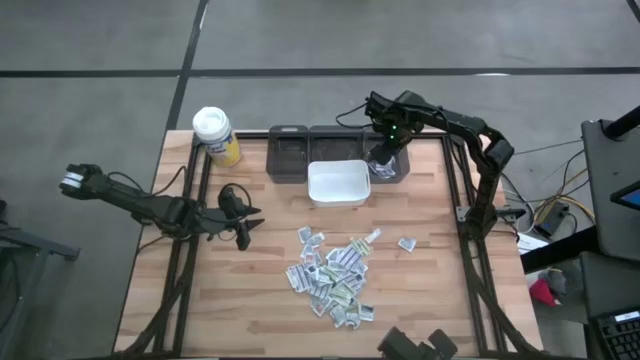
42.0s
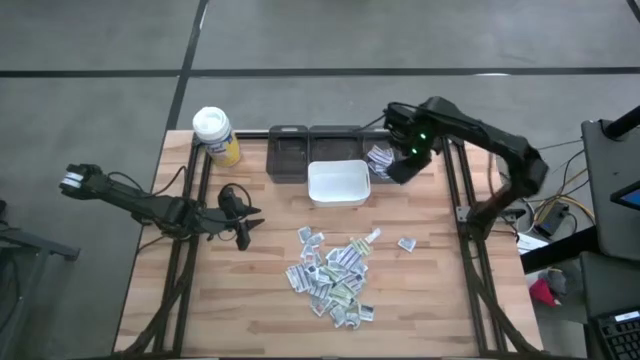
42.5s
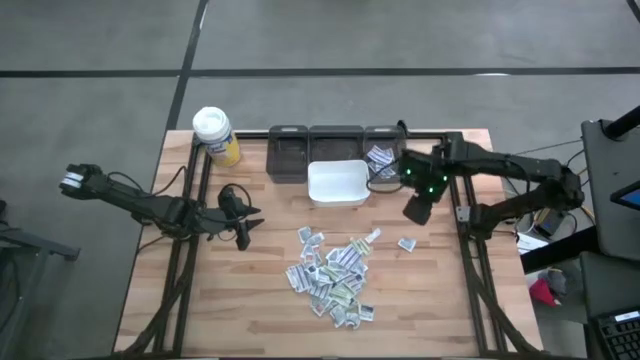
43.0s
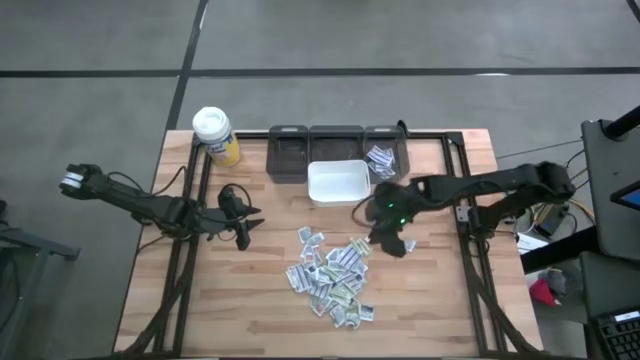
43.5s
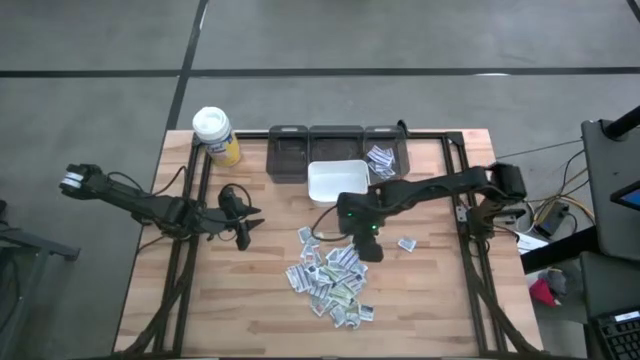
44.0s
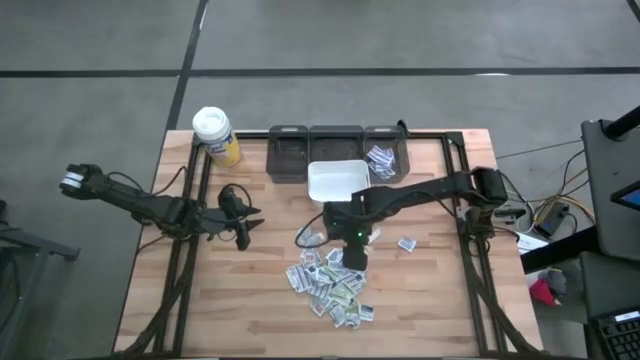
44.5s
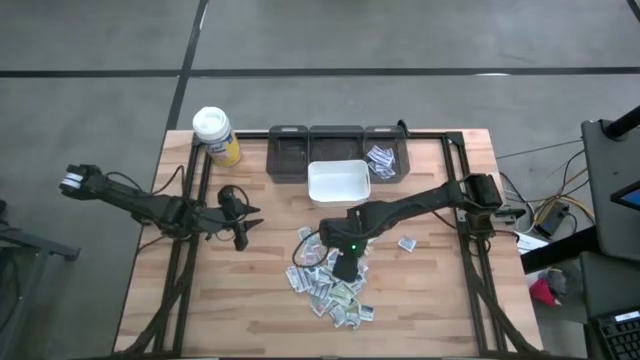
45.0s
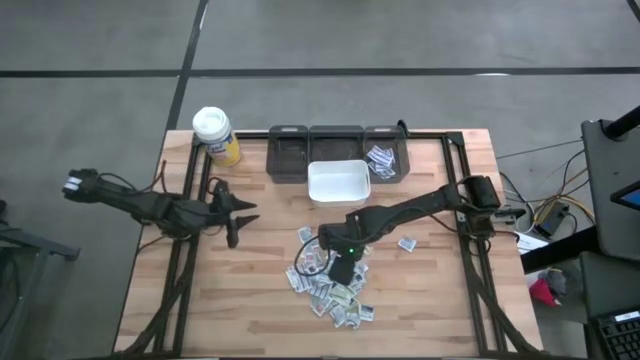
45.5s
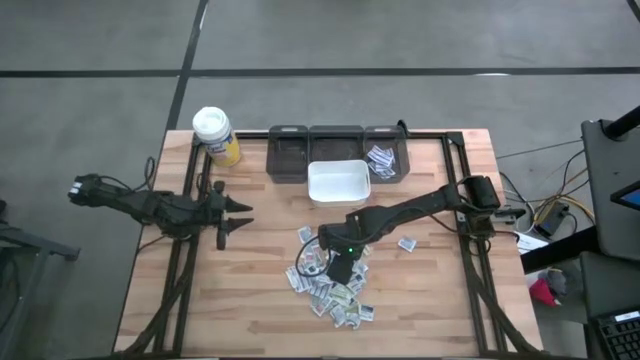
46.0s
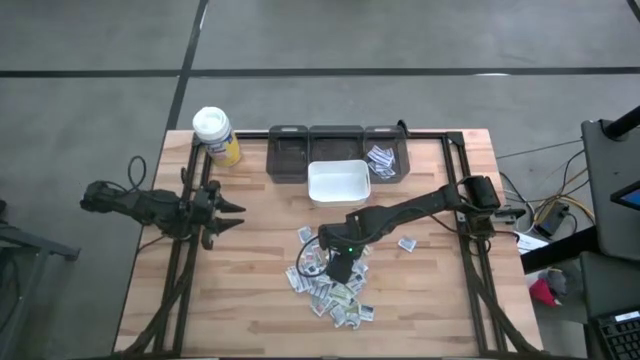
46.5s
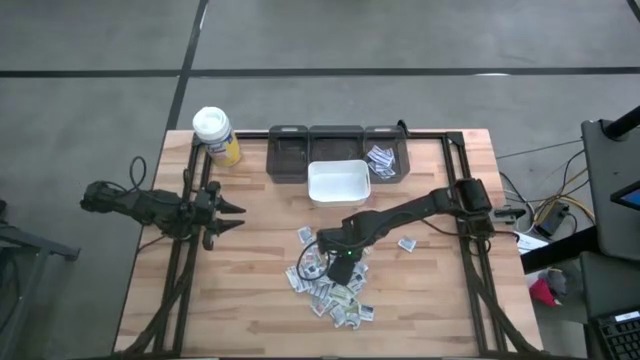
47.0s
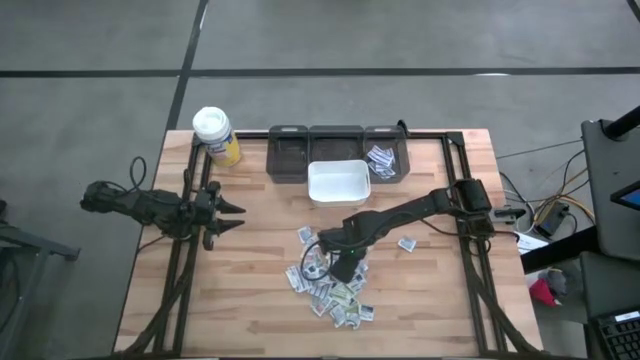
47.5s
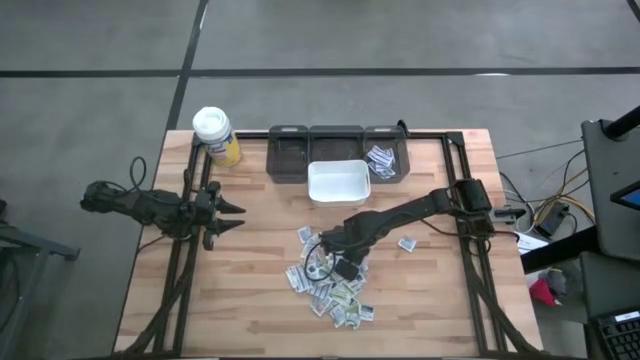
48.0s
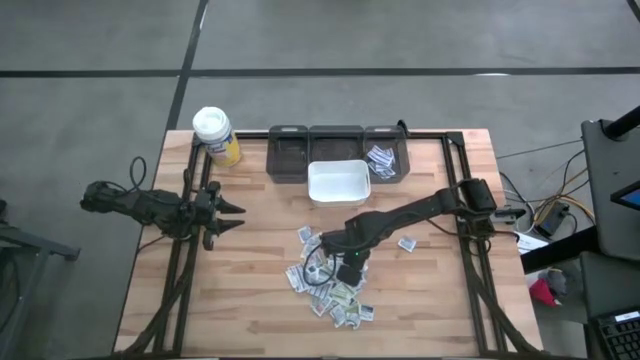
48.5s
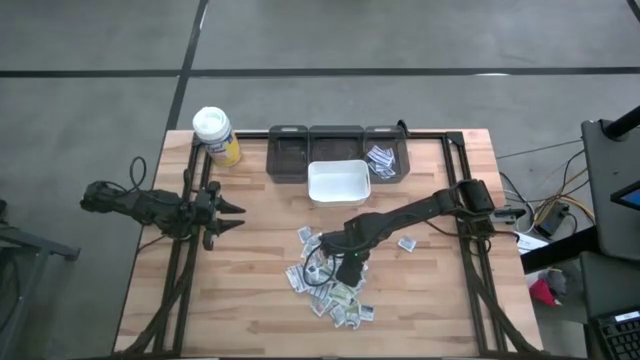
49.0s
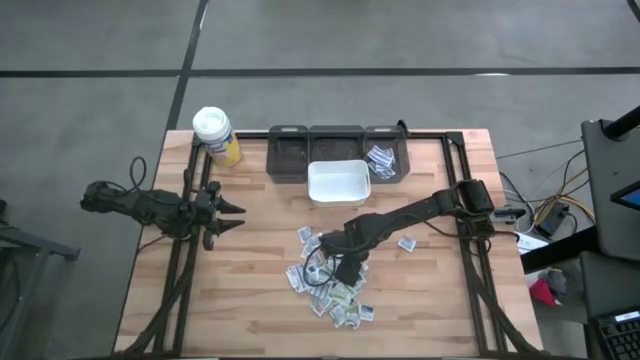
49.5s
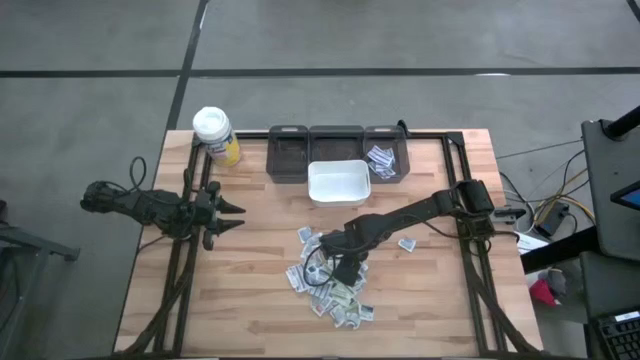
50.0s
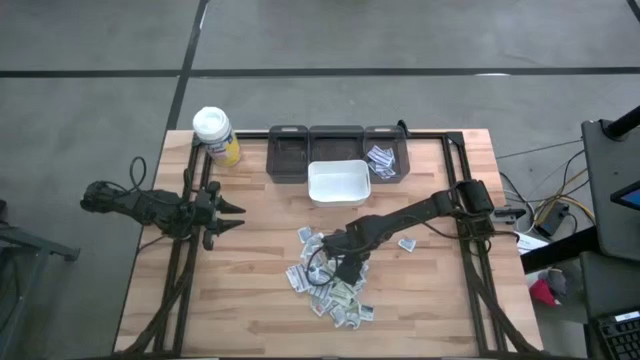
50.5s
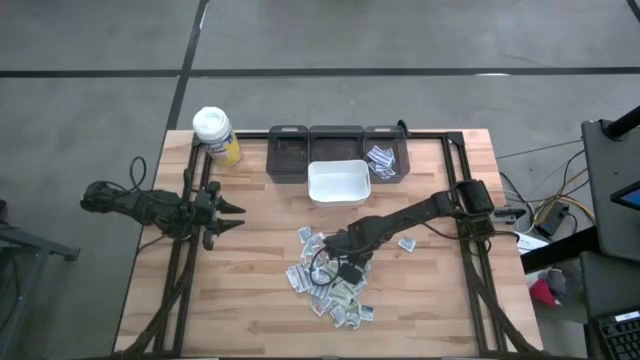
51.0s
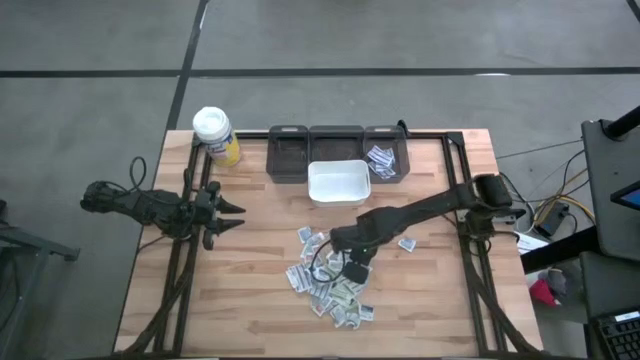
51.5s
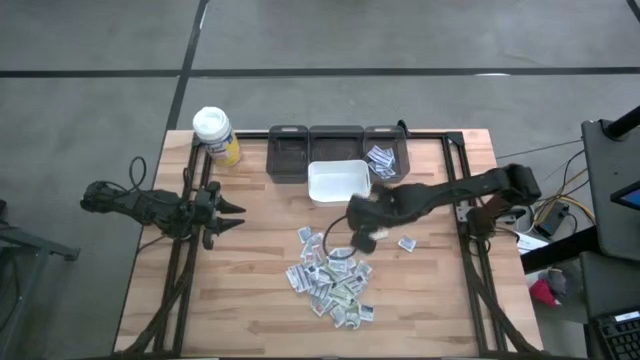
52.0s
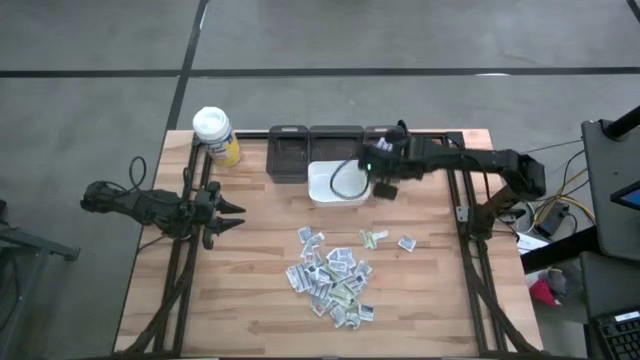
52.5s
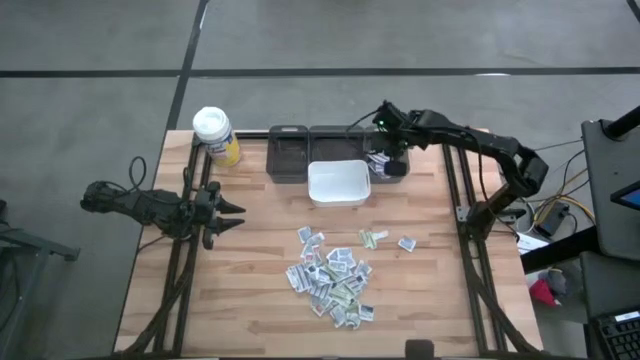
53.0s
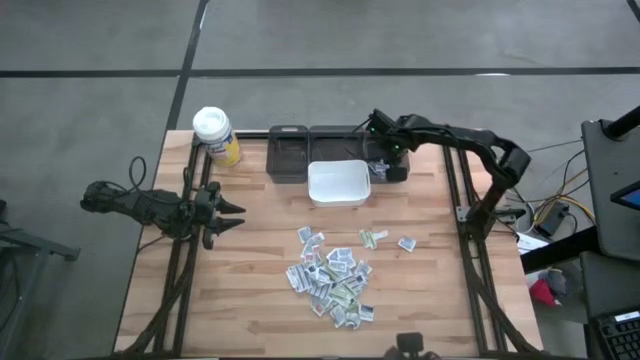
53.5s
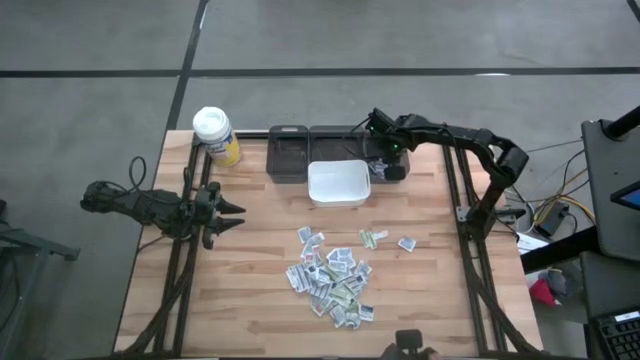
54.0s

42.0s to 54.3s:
Task: Pick & Place First Aid Supplies
Put the blue bandage pack into the right black bin

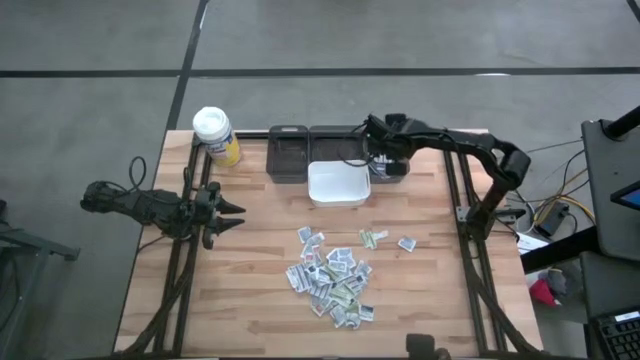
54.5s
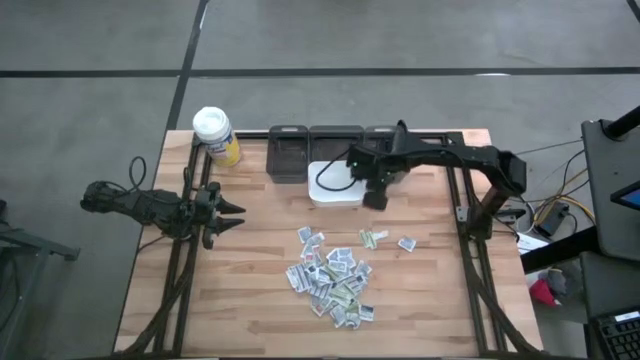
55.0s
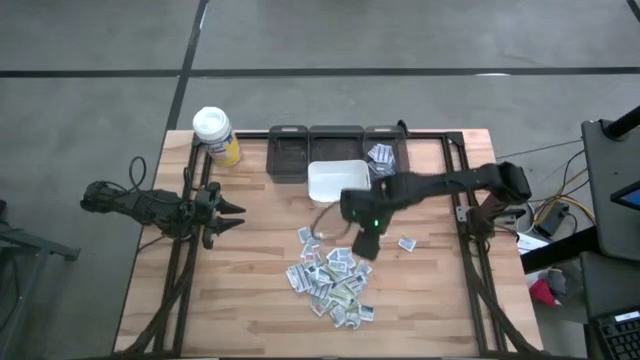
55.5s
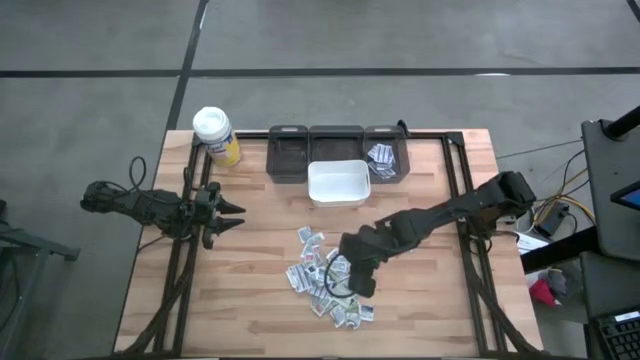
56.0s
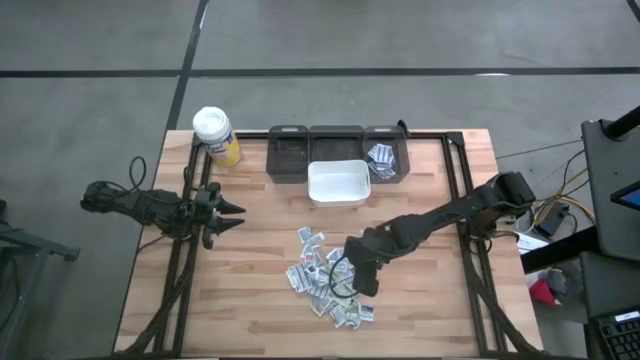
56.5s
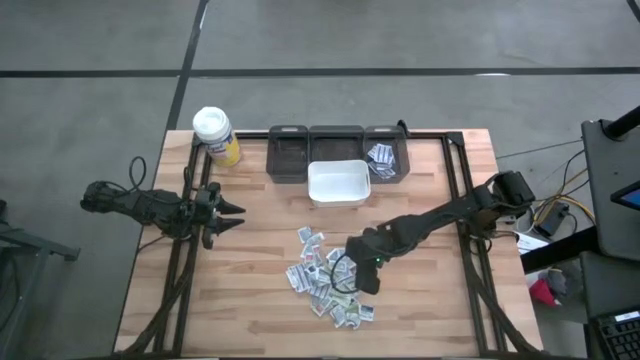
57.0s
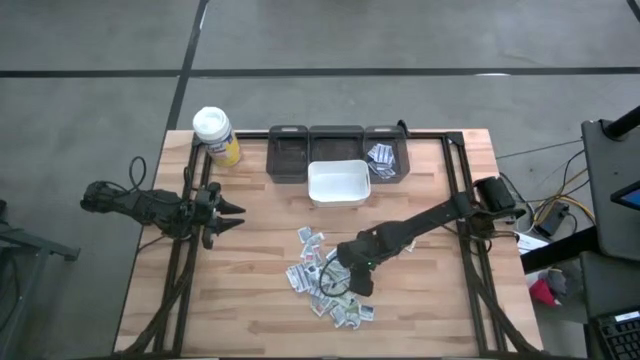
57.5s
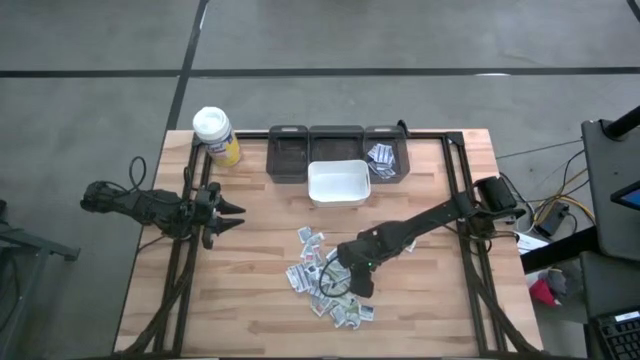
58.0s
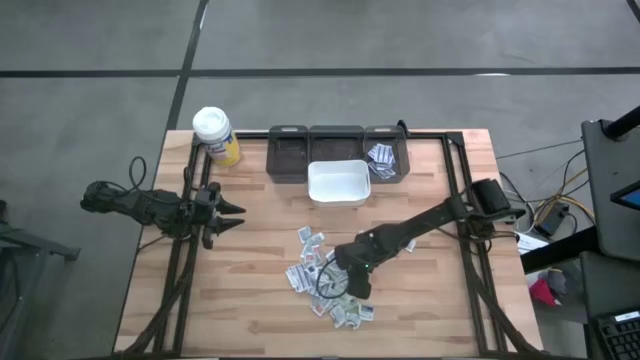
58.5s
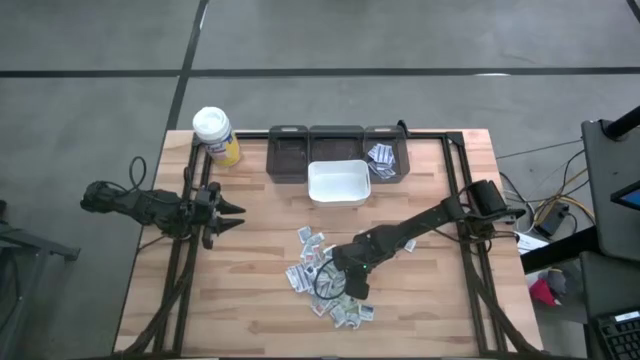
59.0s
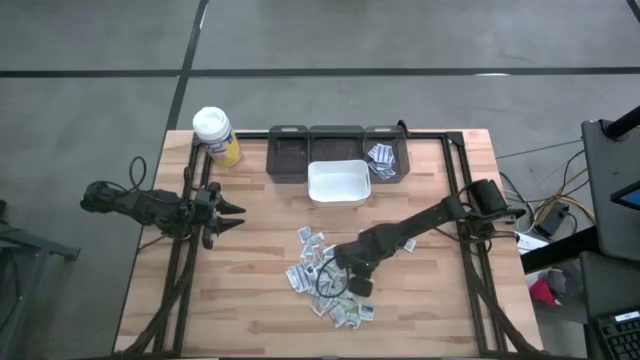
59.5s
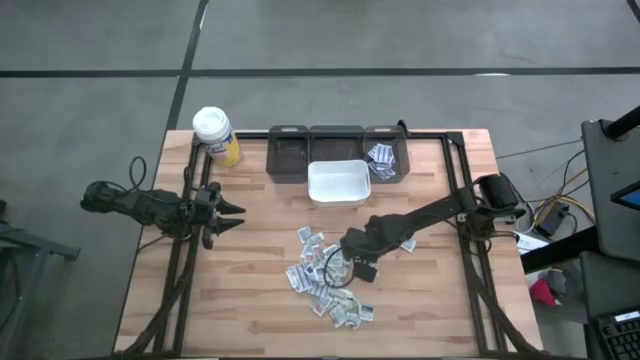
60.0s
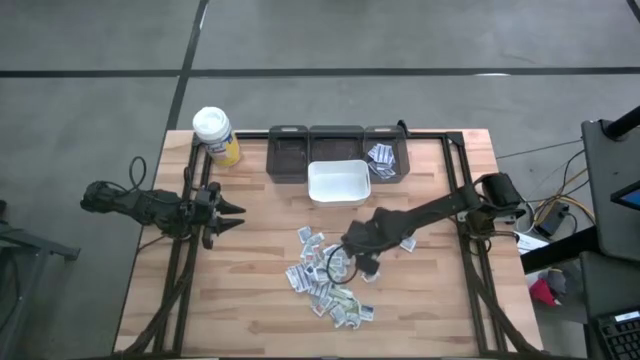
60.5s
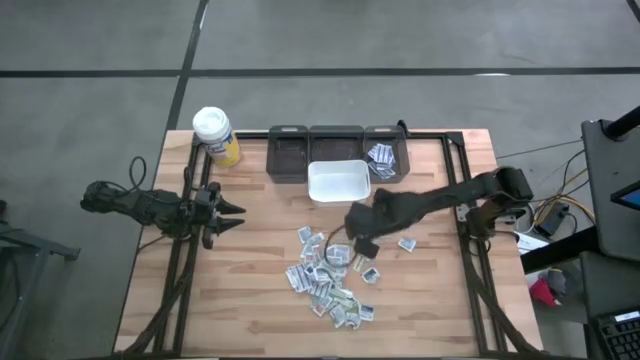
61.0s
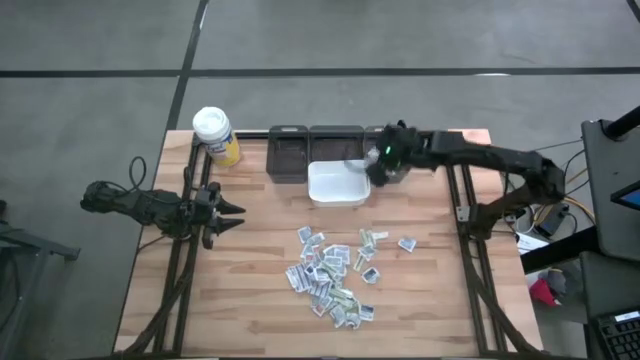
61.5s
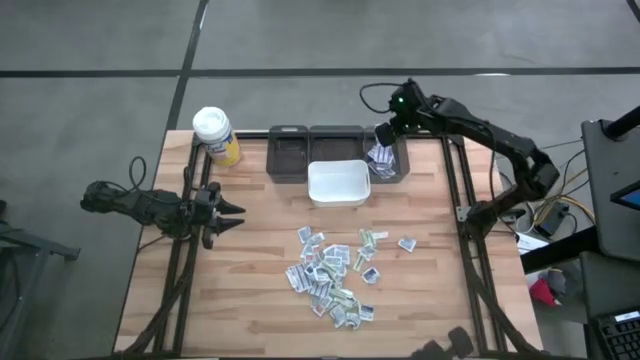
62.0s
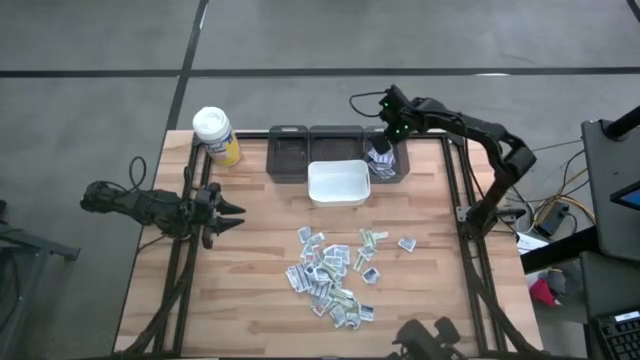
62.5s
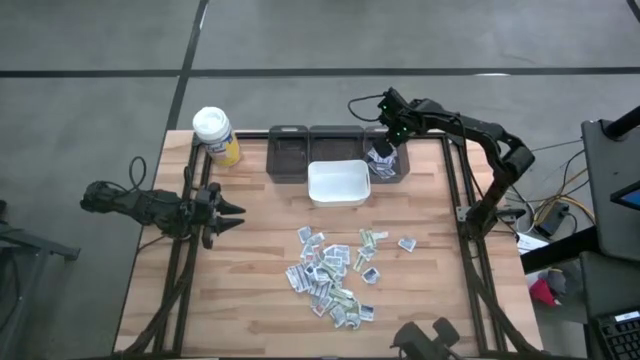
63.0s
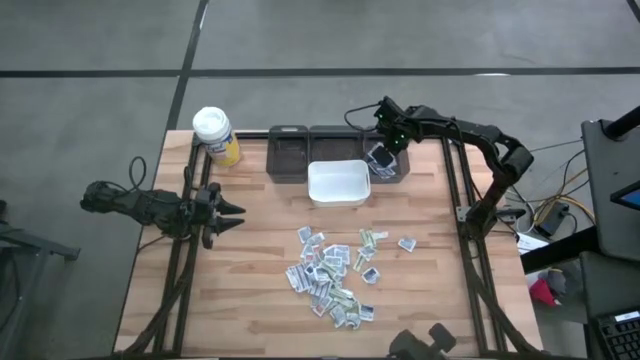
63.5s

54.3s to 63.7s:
Put the right blue bandage pack into the right black bin
